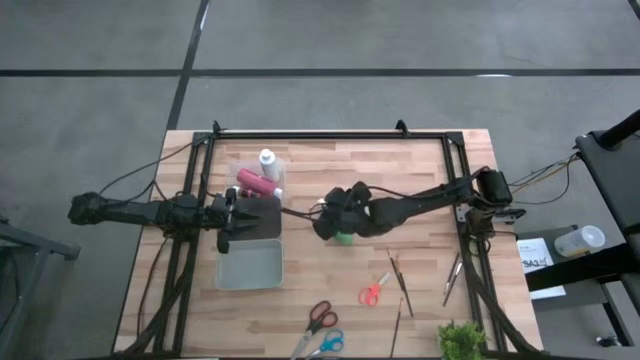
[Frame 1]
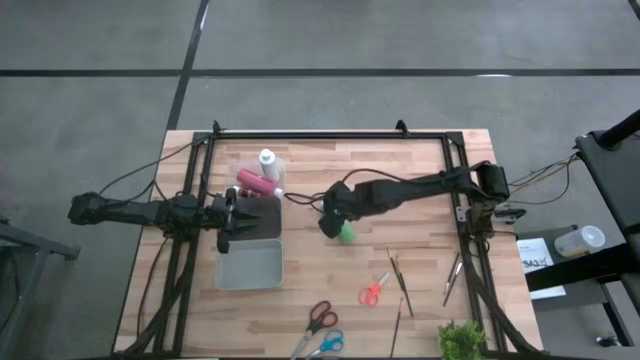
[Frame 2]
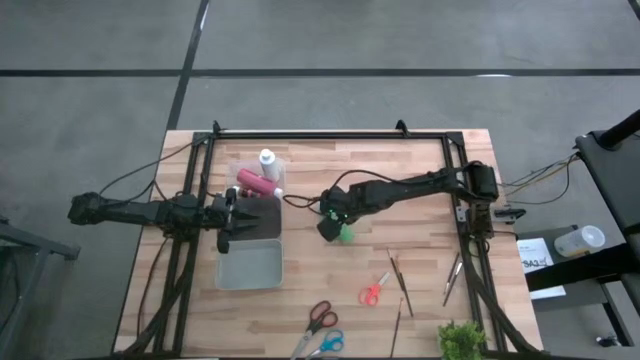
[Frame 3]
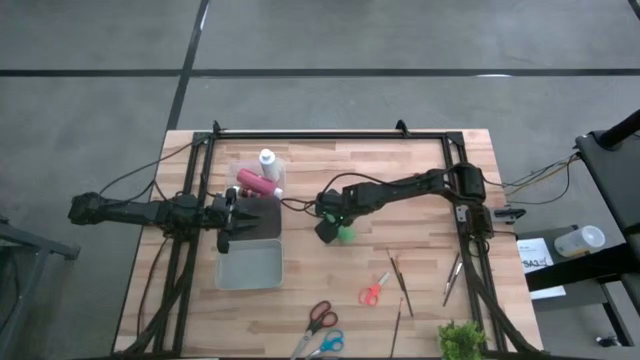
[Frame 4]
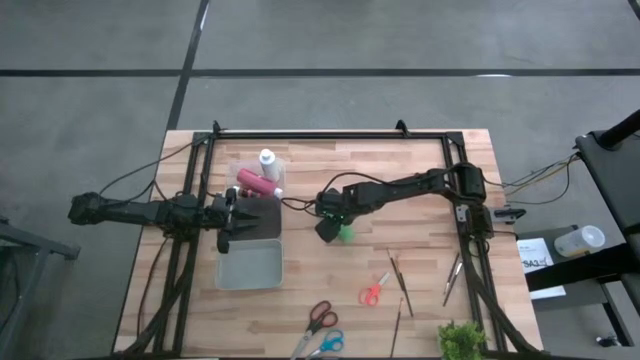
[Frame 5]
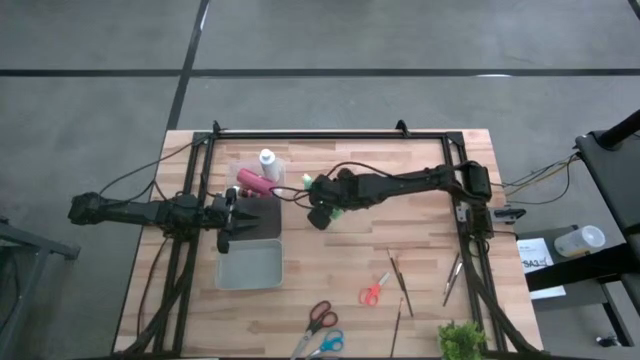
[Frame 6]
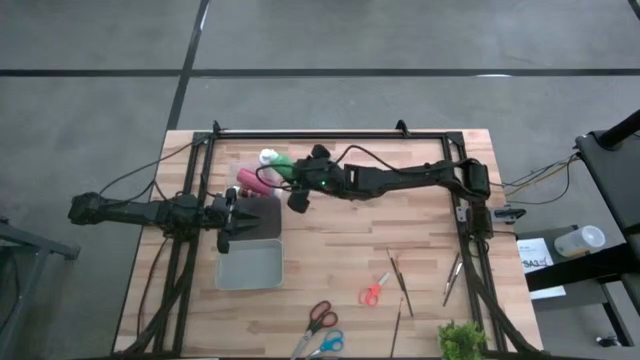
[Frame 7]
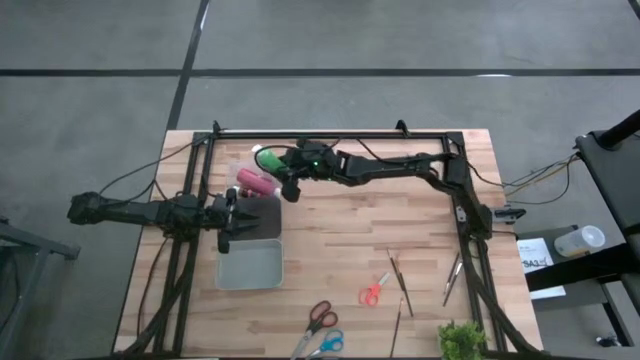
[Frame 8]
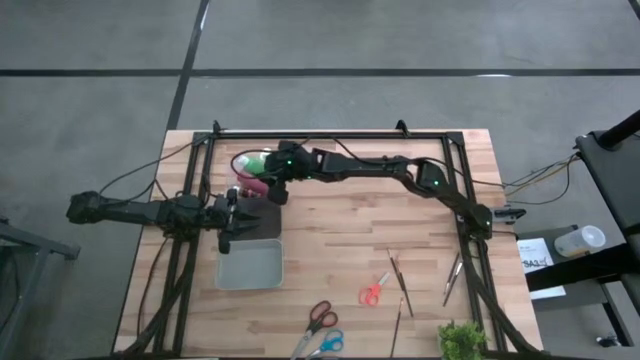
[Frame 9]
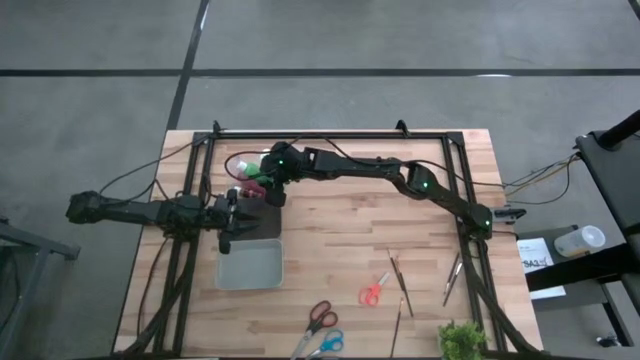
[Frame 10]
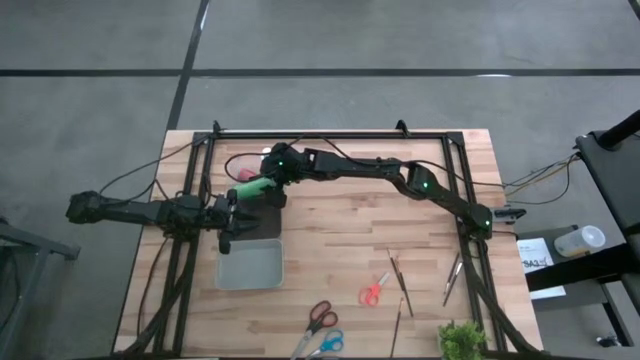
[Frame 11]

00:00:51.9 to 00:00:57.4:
Task: Pick & Place Paint Supplies
Put the green paint bottle into the transparent bin

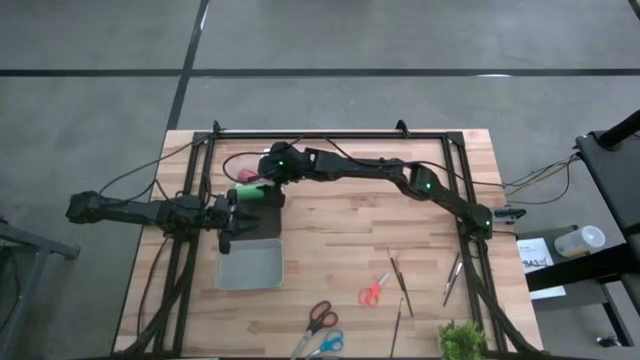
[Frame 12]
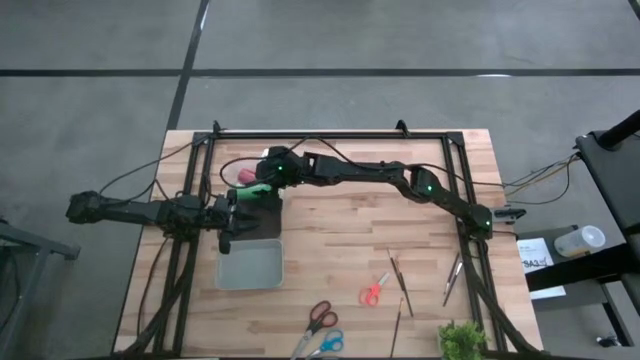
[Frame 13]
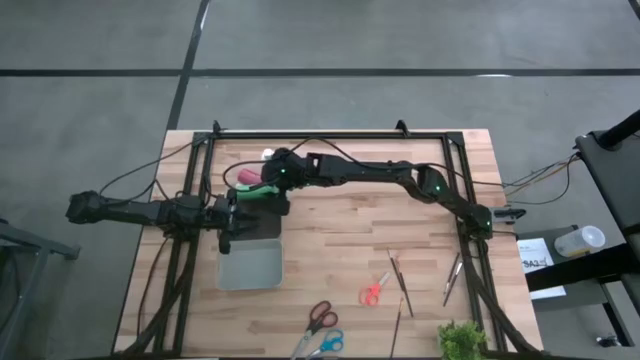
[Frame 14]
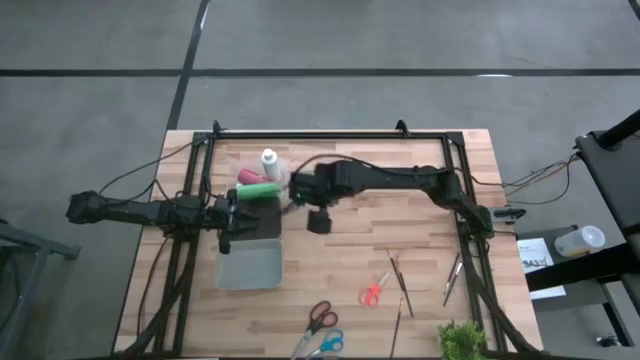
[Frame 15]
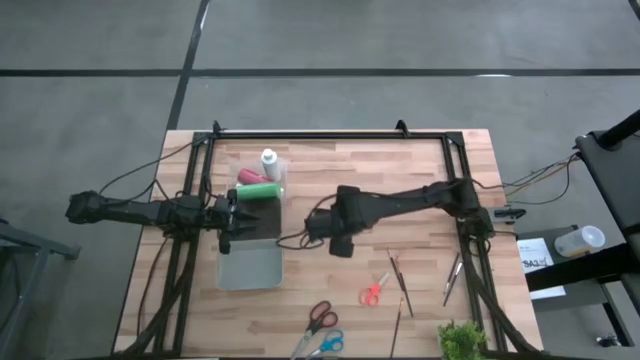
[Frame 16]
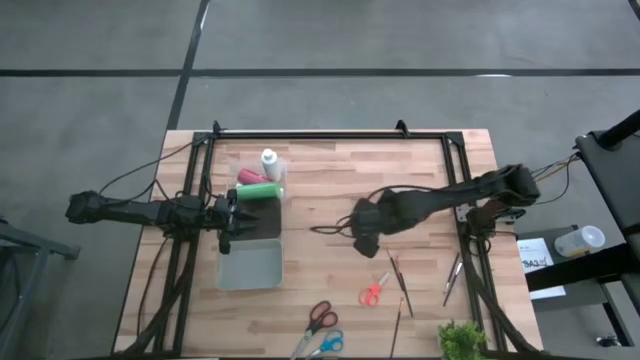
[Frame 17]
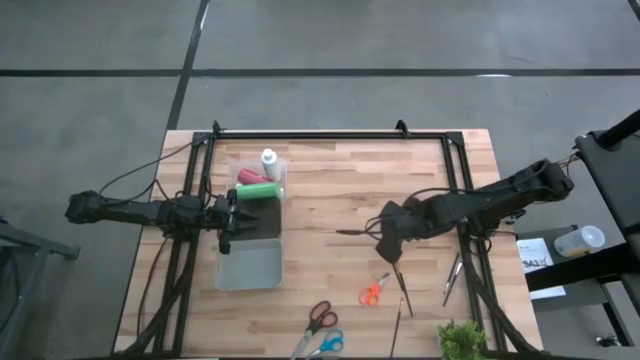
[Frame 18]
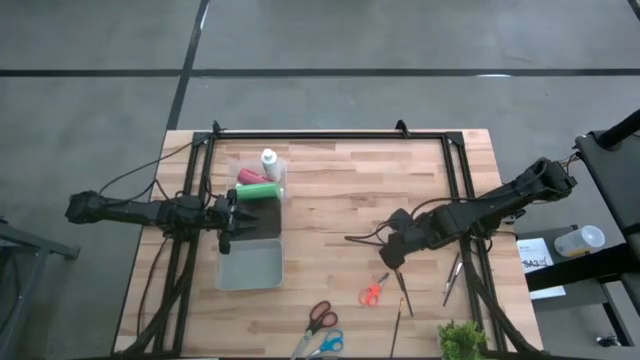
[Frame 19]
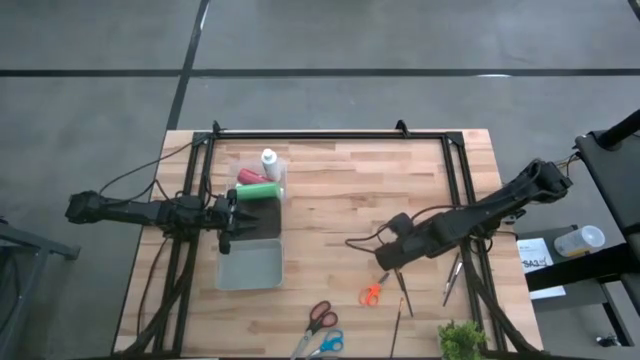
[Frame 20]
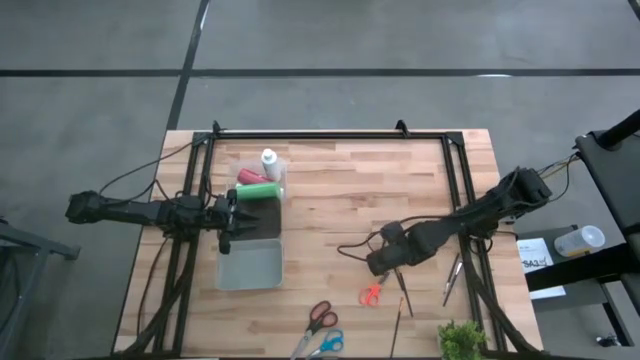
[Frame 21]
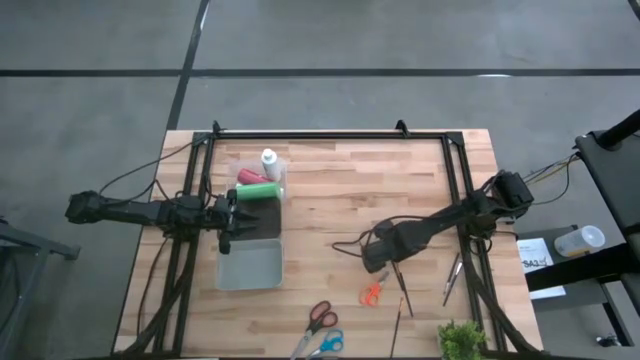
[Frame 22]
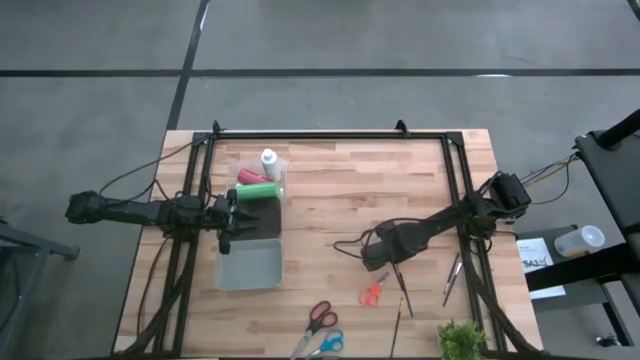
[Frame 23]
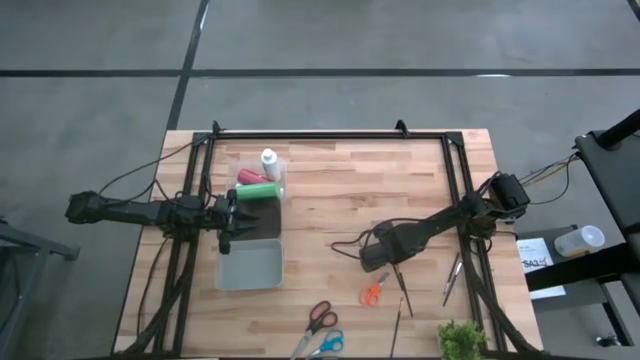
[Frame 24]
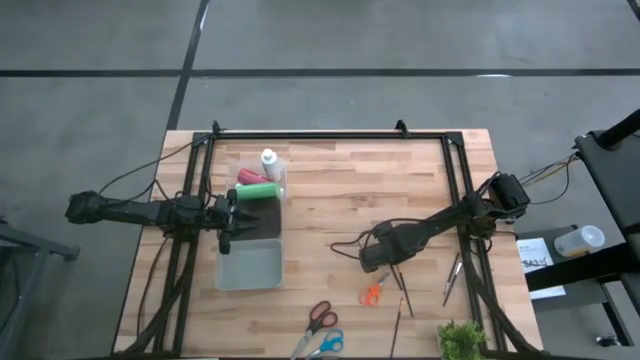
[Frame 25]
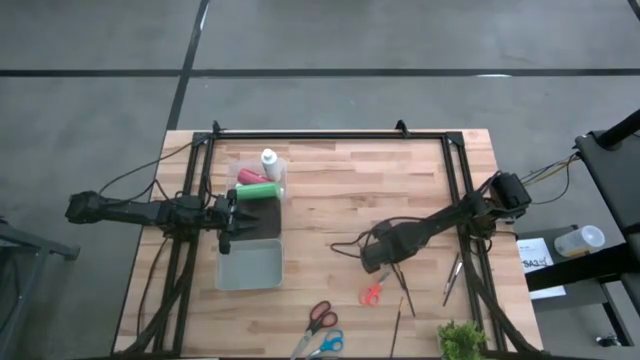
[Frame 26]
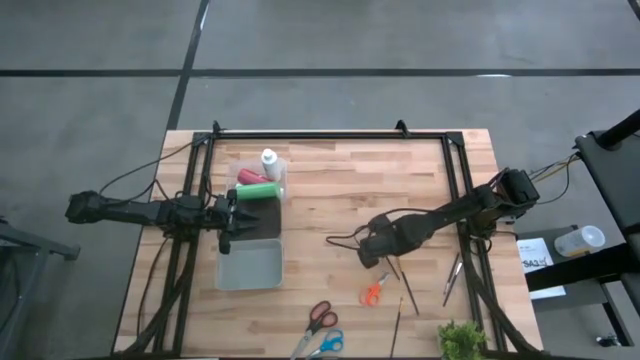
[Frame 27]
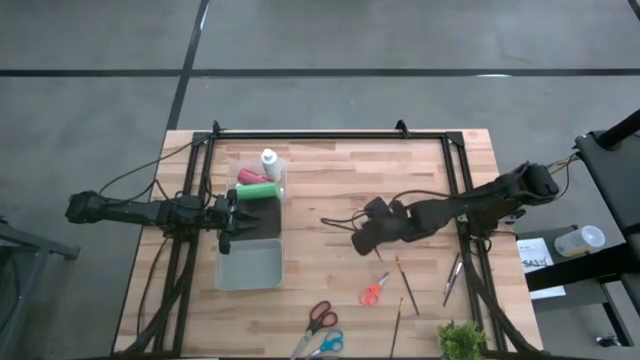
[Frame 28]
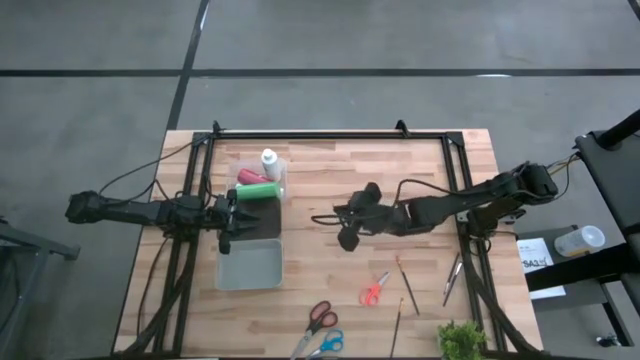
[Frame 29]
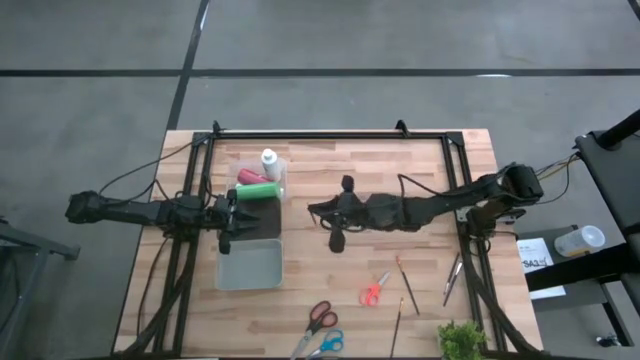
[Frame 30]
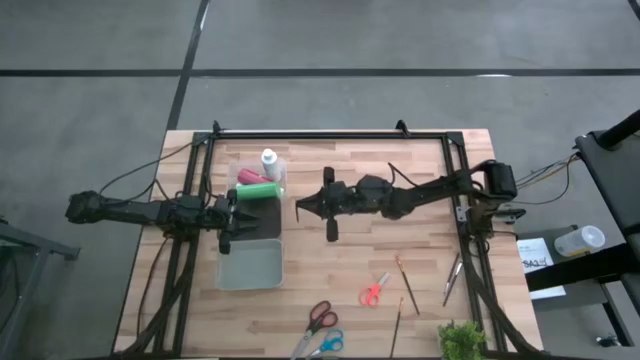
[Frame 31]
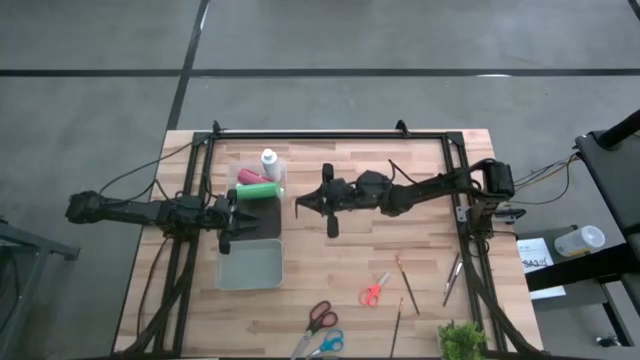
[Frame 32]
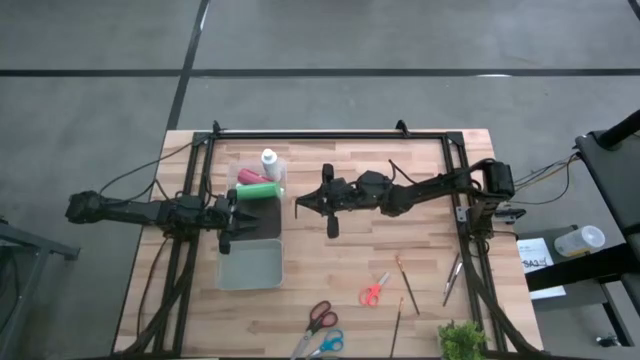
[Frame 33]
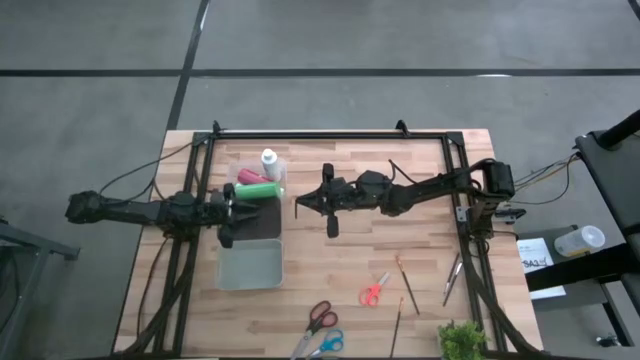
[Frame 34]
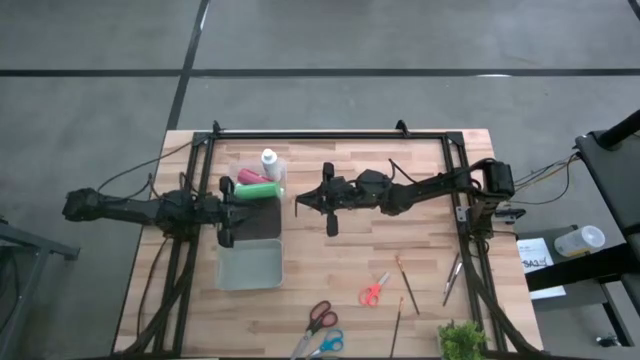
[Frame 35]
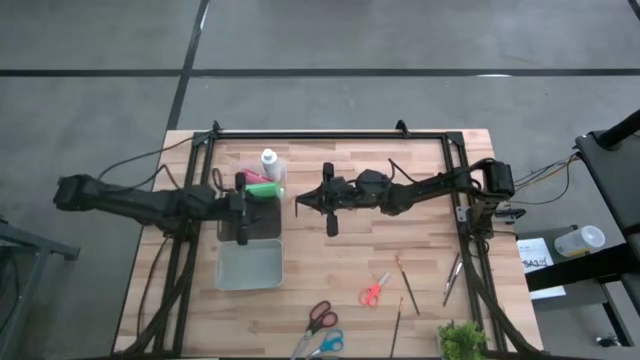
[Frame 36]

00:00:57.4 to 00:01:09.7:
Put the left silver makeup brush into the black bin

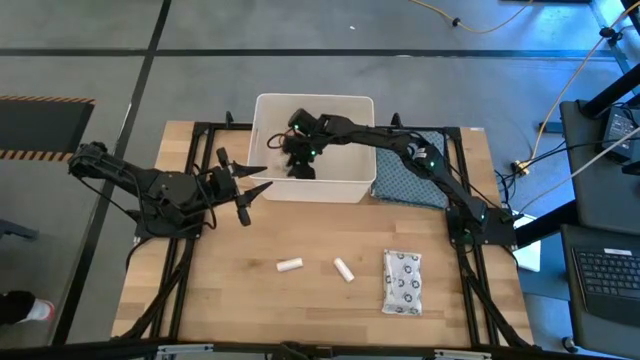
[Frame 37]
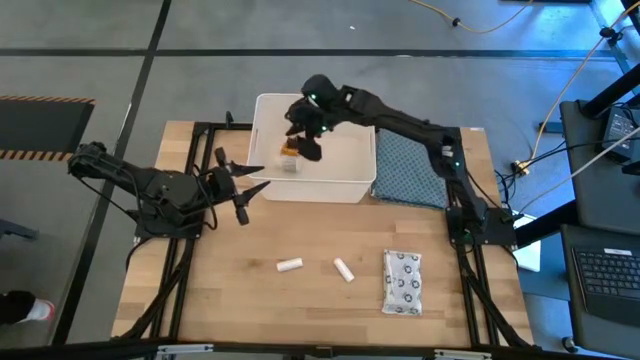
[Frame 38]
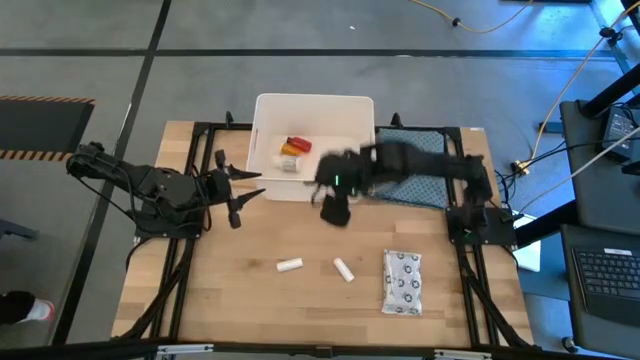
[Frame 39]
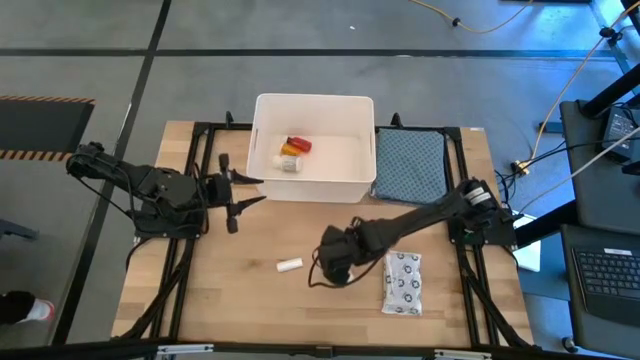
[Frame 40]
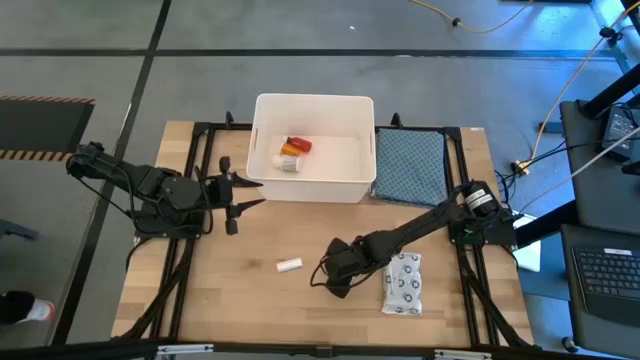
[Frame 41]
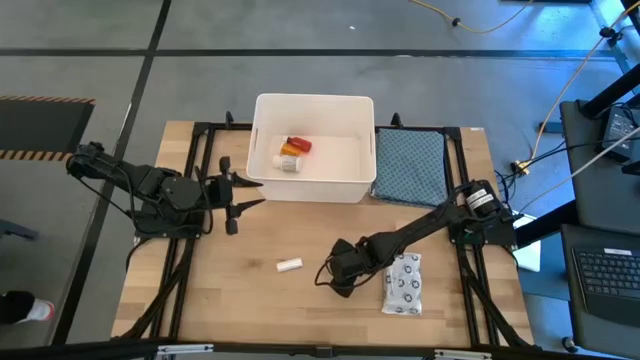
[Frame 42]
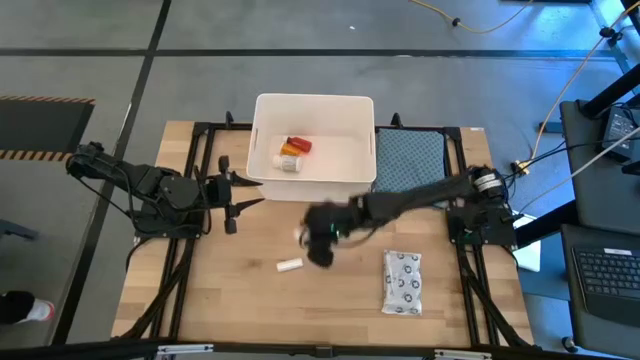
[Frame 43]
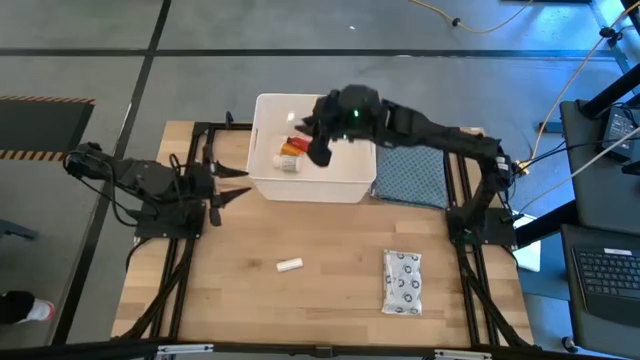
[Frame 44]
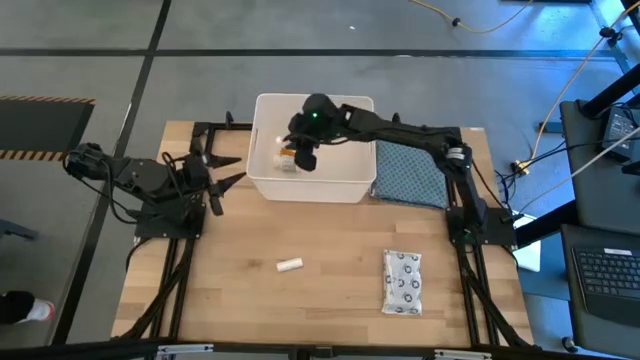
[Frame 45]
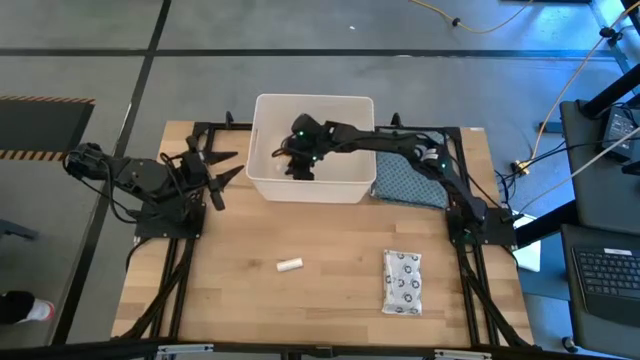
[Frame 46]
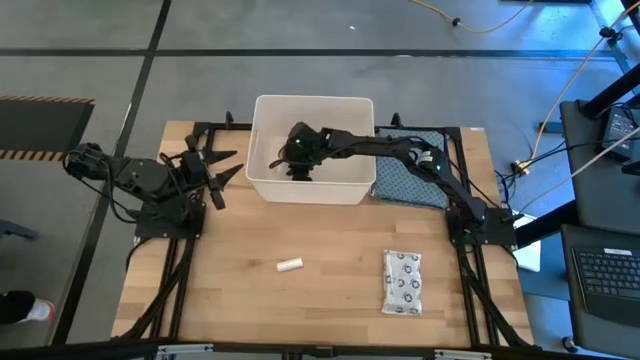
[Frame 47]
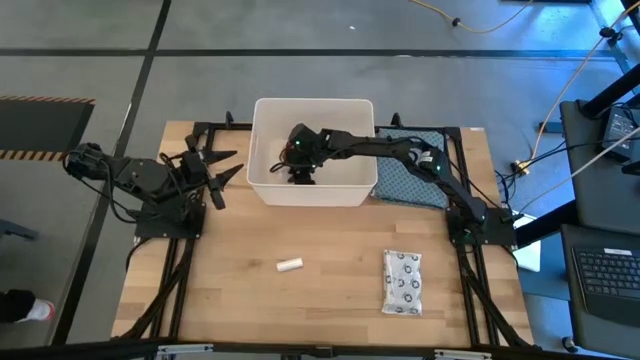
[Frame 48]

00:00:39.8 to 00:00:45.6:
Task: Pick & place medical supplies in basket/bin
Put the right rolled white gauze into the white bin
